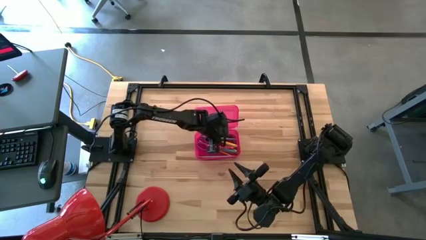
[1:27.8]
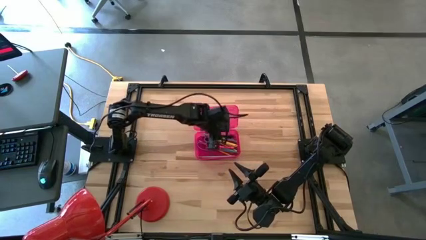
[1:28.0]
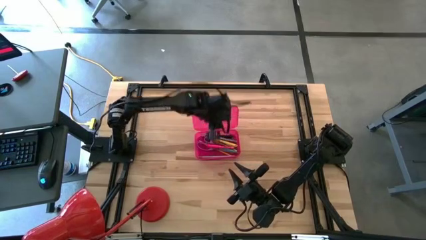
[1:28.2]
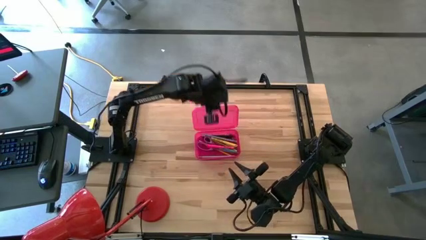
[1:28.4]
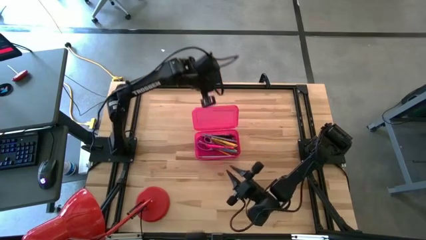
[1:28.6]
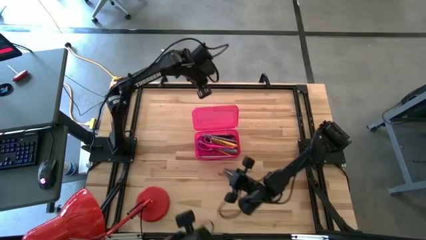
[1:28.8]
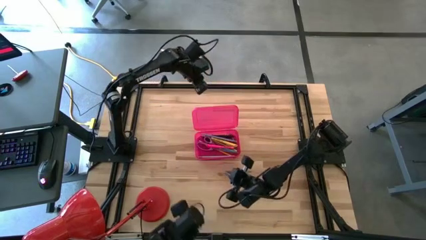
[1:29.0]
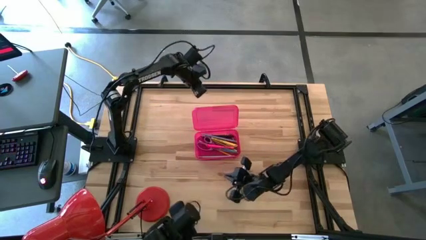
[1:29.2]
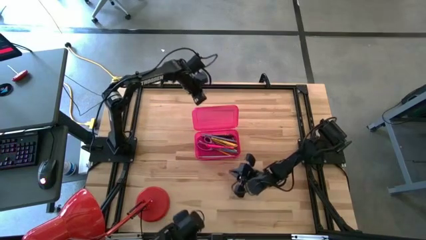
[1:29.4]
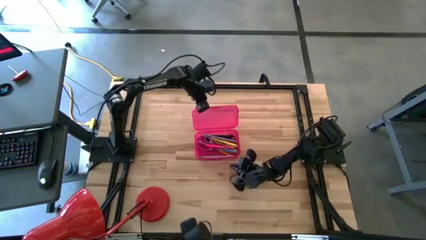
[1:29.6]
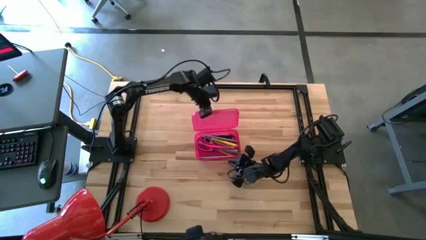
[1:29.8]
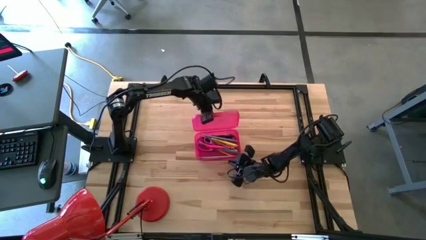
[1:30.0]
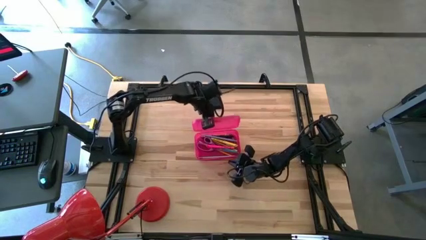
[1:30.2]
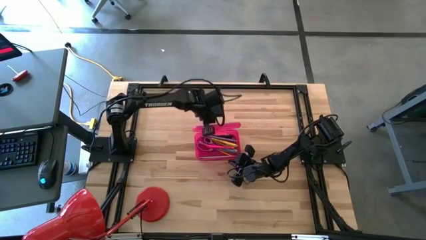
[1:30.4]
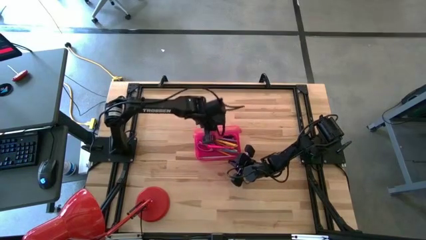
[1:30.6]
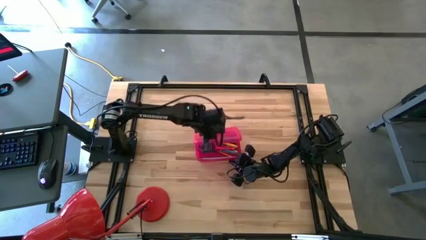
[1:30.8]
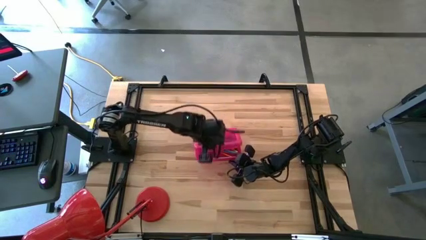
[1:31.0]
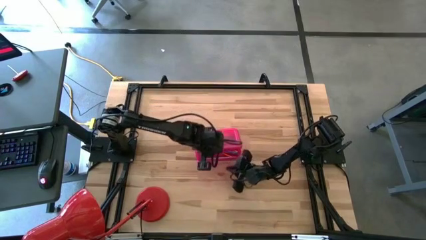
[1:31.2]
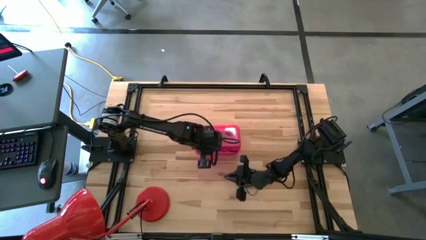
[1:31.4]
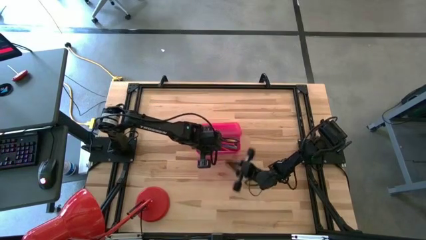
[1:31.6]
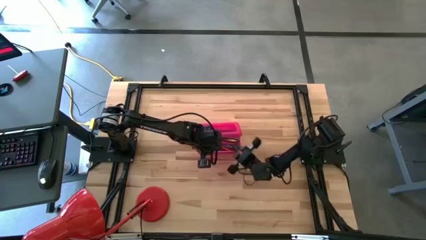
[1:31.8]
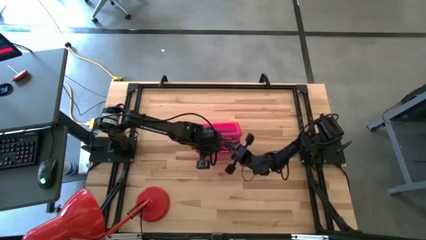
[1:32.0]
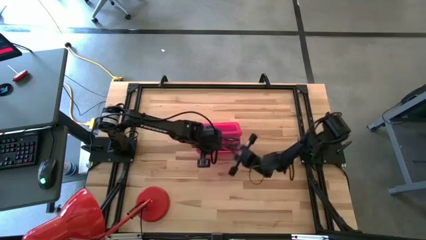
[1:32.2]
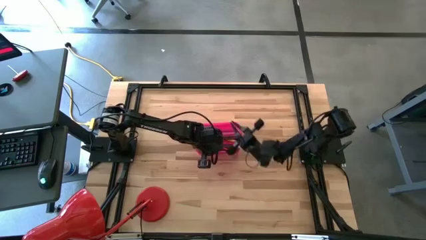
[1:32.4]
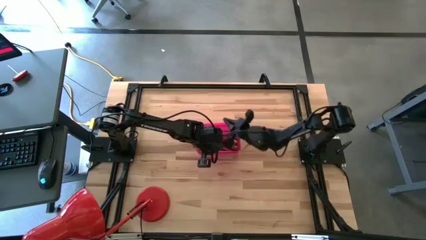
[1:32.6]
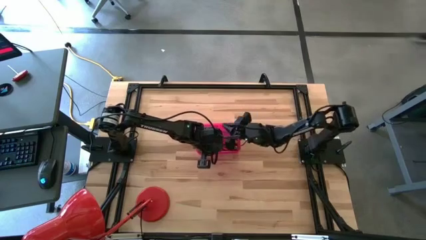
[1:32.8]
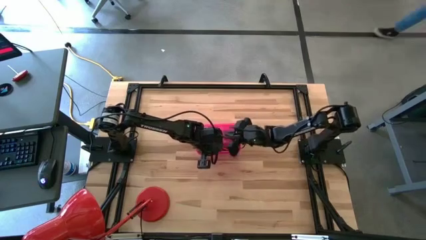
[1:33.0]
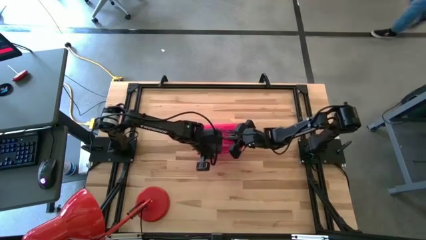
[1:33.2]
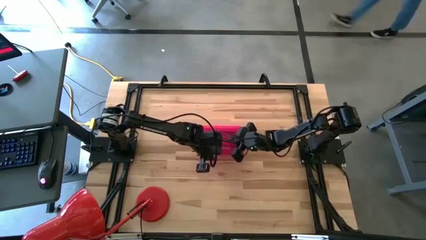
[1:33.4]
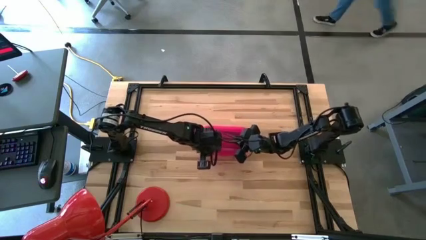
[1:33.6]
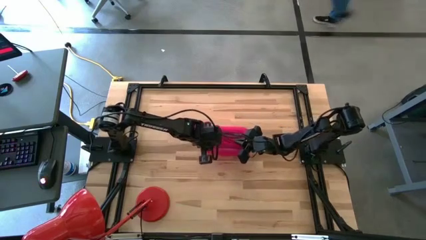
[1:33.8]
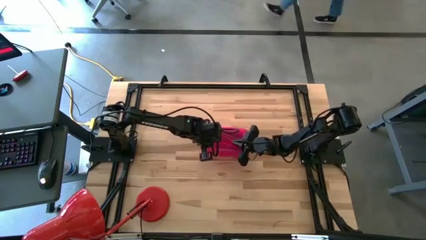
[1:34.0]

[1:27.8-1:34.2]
Task: Pick & place school supplies into a supply box
Close the pink supply box

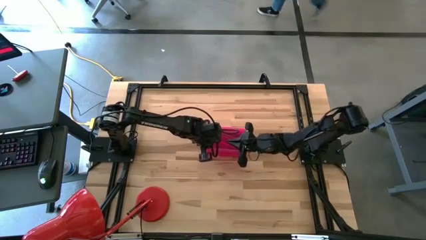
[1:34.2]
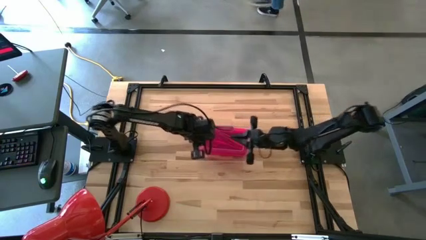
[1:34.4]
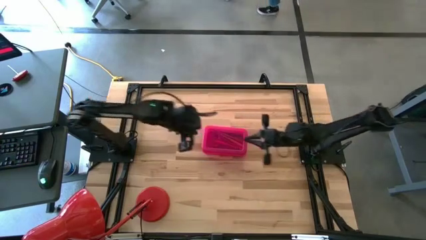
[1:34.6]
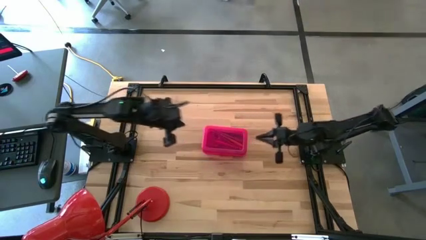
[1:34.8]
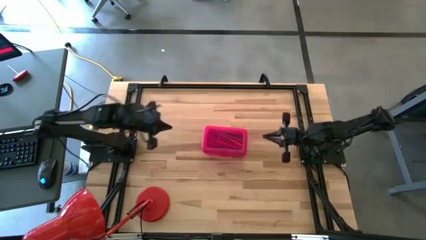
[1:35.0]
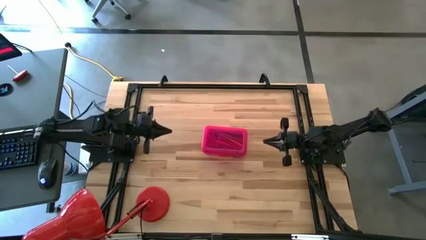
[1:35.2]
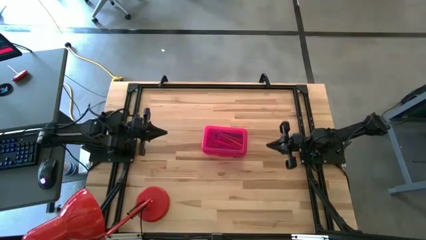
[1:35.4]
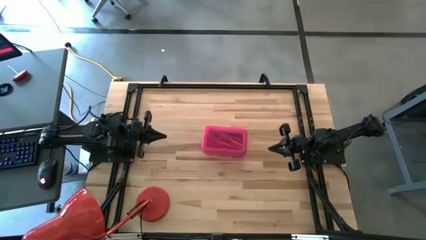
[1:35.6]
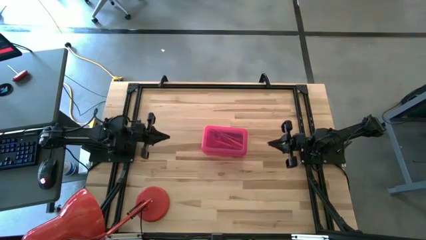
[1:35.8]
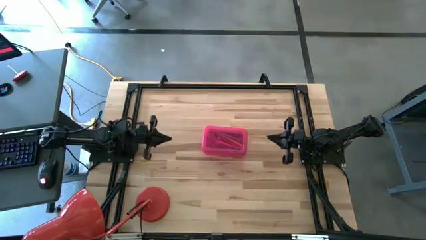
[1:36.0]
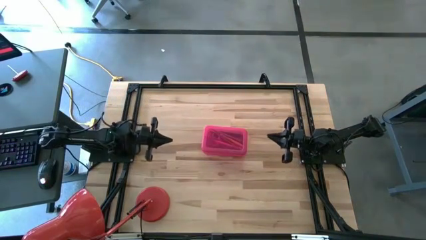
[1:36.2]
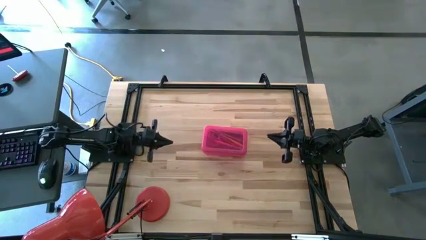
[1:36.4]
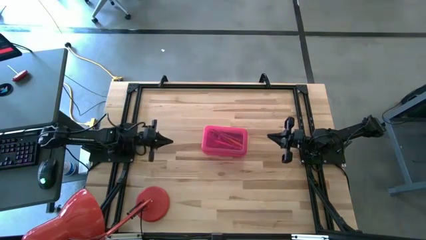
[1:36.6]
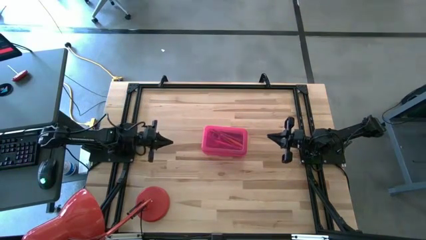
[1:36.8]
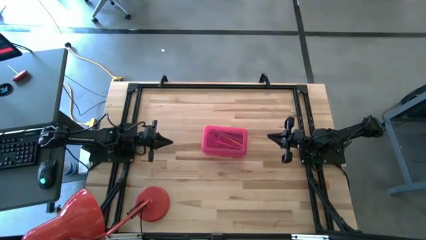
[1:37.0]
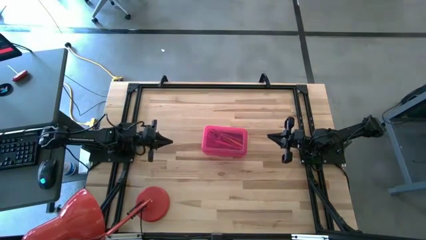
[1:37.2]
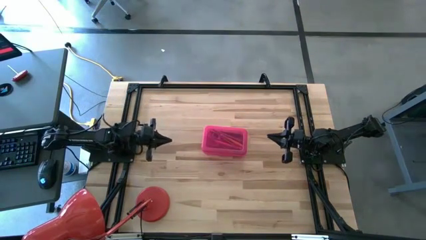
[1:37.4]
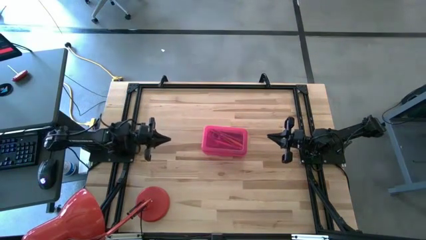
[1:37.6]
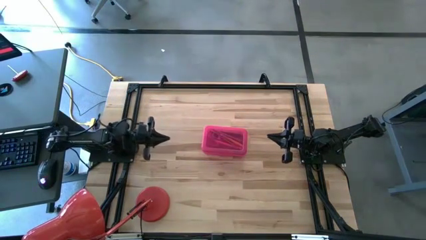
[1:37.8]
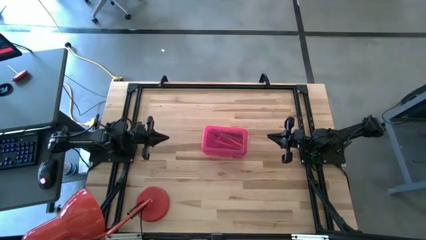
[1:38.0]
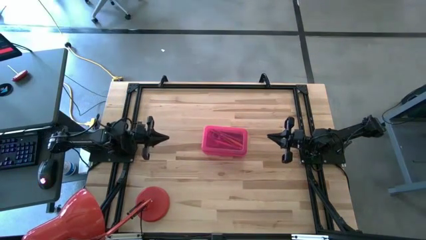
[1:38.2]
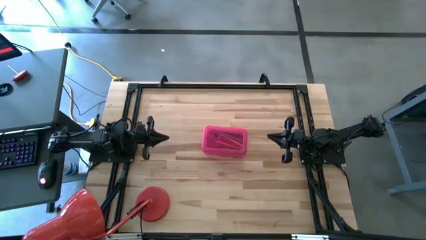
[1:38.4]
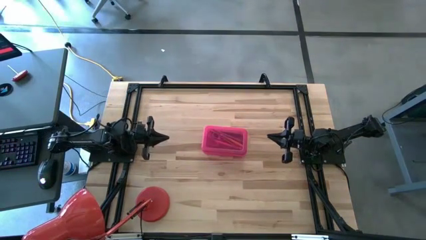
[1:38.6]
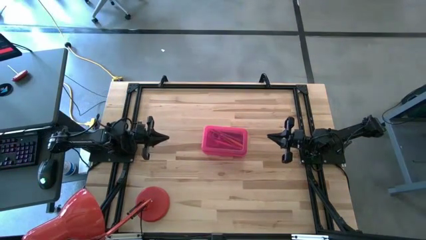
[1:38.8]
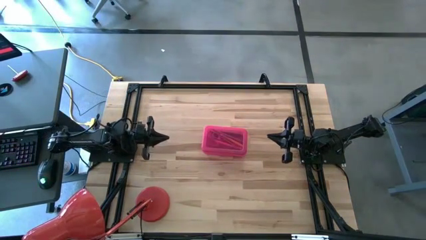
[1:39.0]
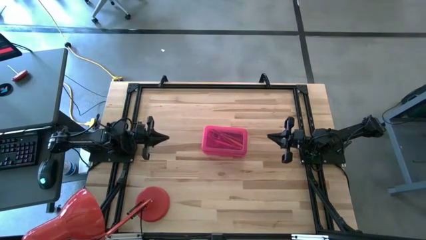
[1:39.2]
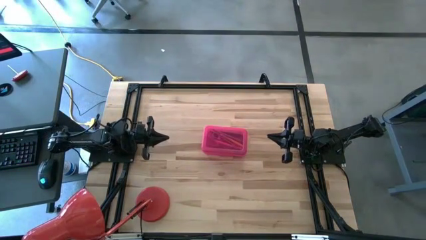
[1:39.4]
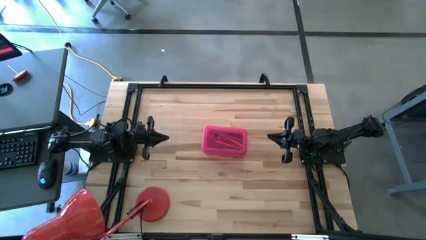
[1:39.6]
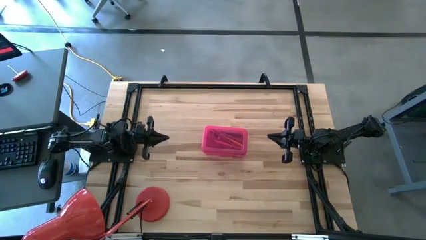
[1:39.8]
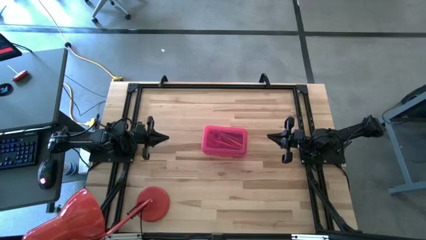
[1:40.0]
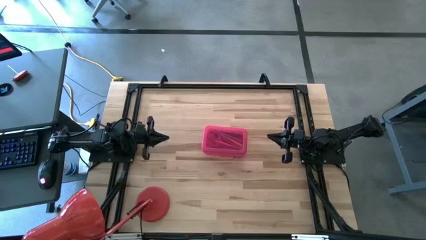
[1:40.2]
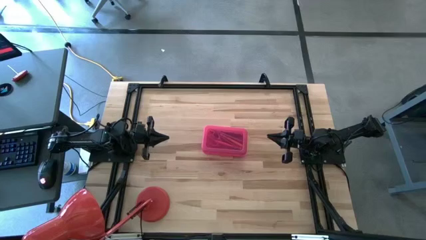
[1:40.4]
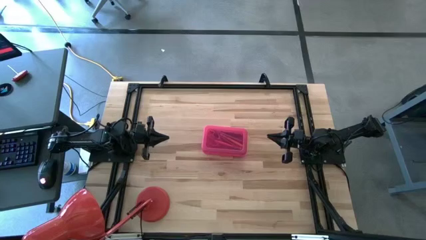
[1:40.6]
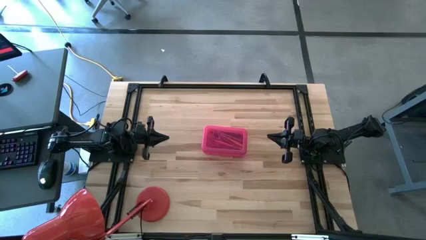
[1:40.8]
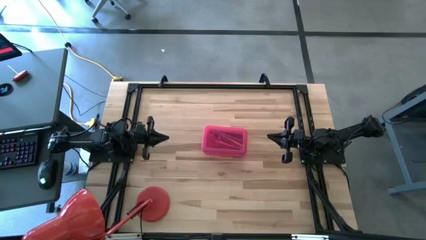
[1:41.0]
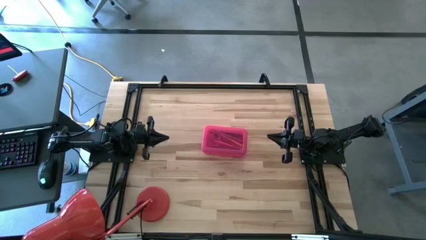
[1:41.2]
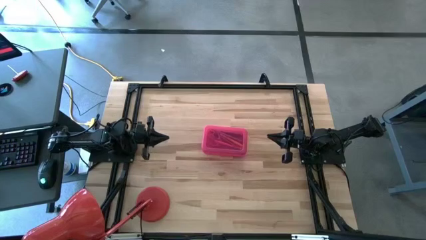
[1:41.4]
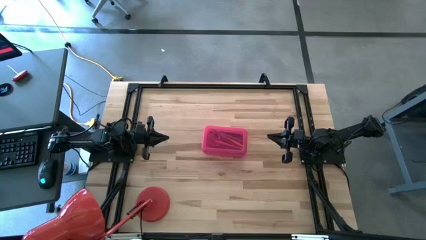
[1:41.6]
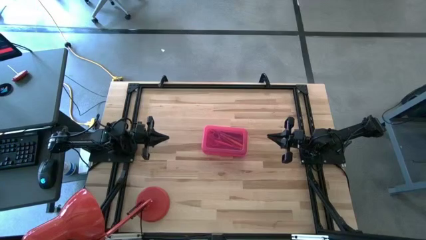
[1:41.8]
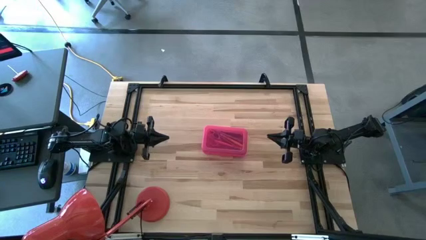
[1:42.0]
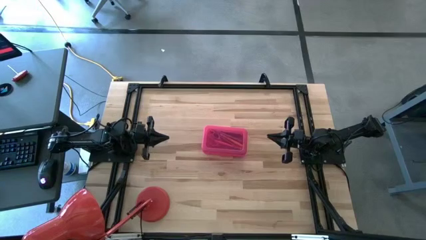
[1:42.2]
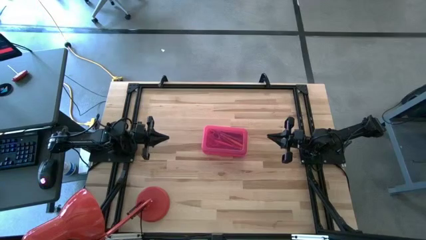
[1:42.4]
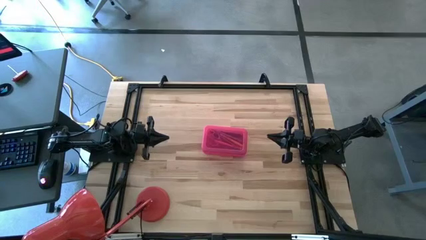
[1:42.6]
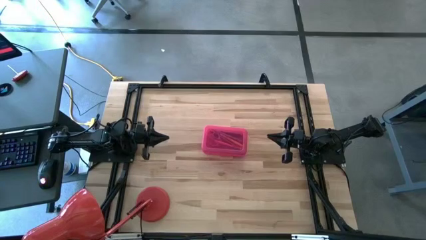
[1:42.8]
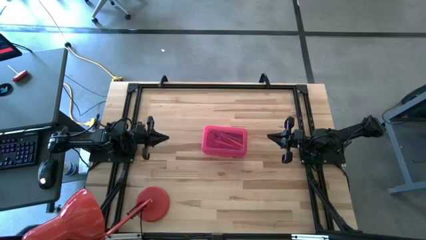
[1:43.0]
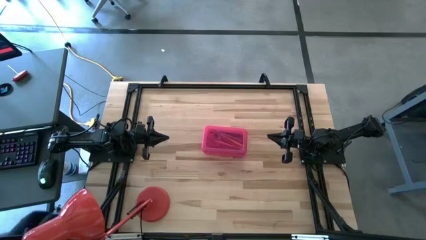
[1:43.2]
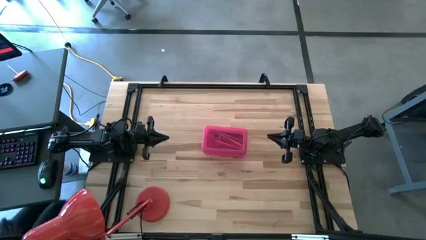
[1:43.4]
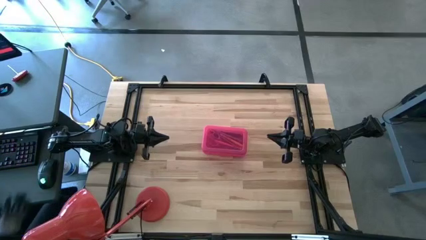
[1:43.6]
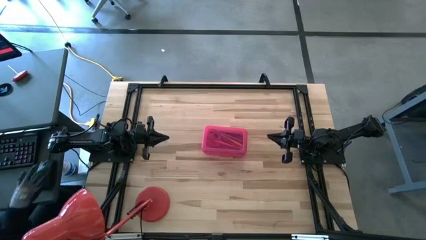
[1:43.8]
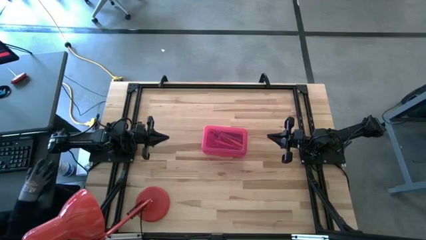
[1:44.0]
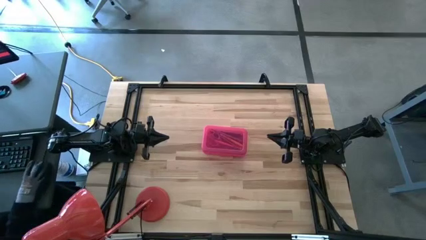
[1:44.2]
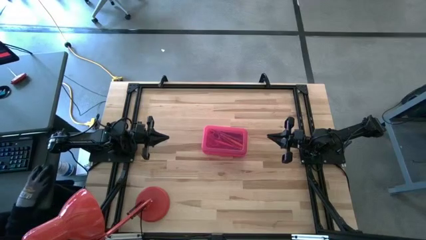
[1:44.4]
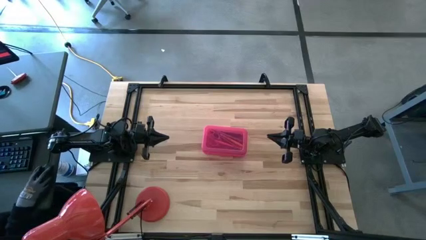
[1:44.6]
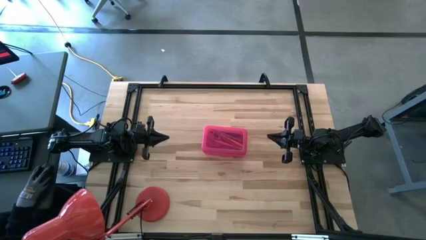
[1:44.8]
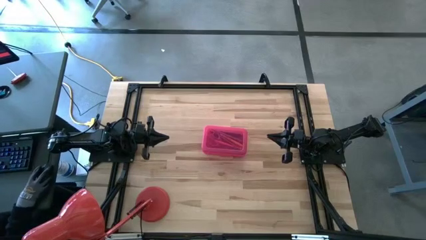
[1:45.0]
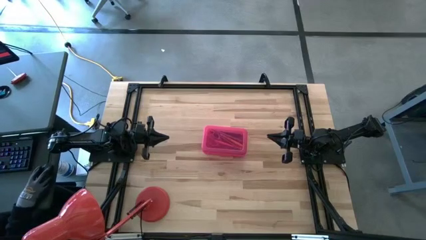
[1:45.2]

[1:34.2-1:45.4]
Return to home position
